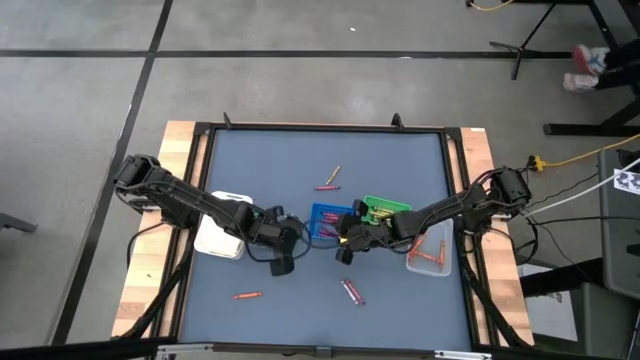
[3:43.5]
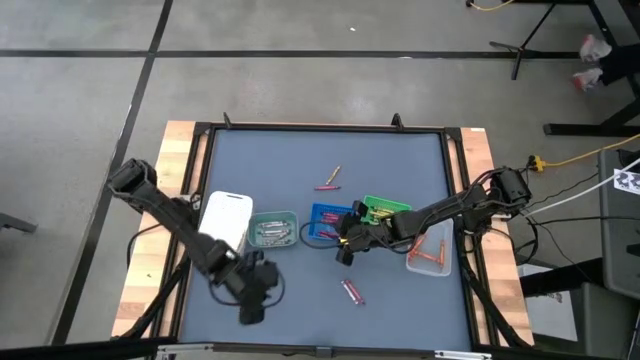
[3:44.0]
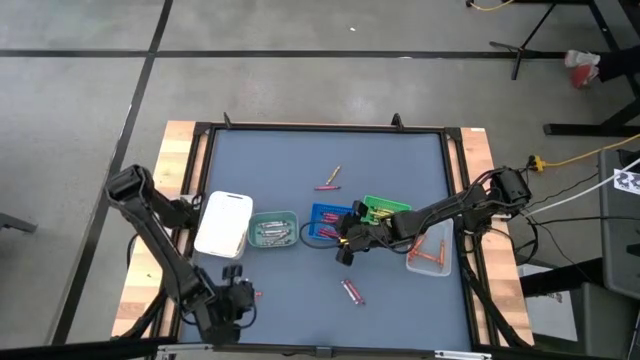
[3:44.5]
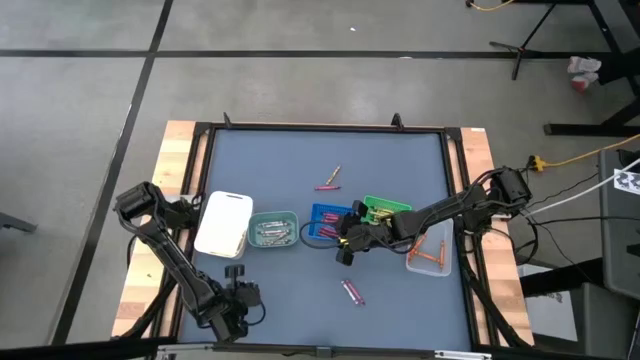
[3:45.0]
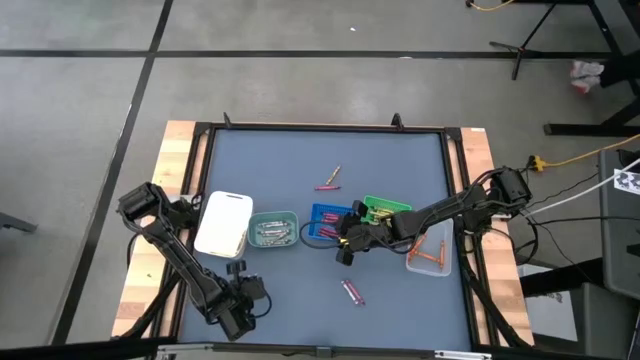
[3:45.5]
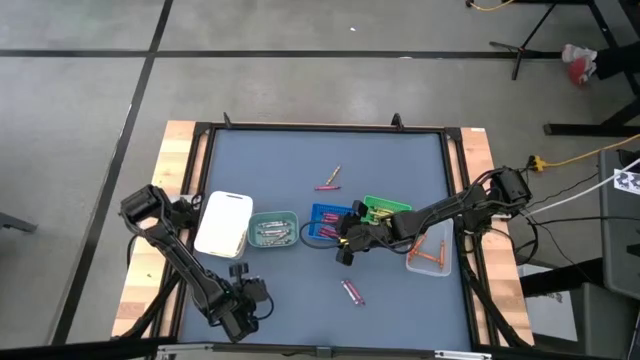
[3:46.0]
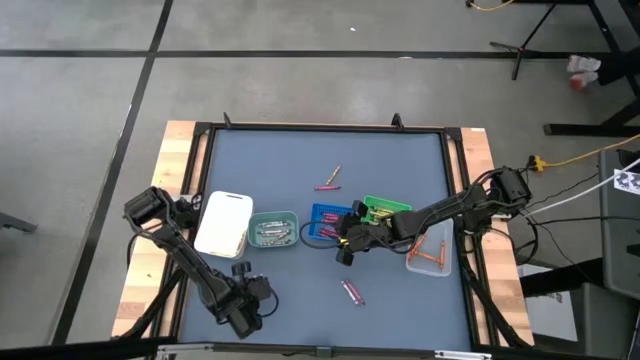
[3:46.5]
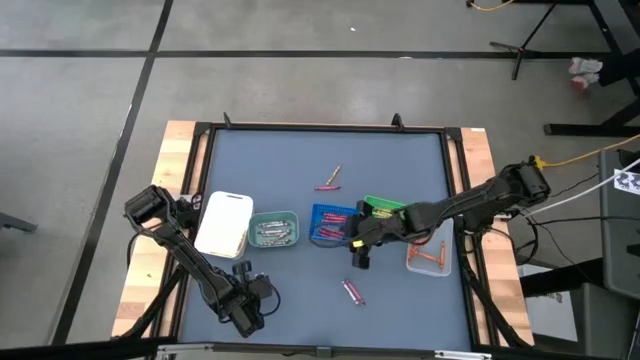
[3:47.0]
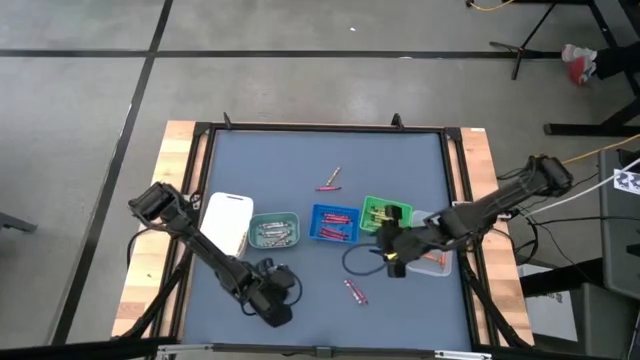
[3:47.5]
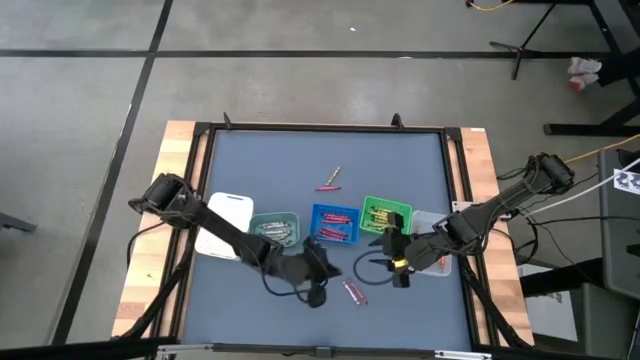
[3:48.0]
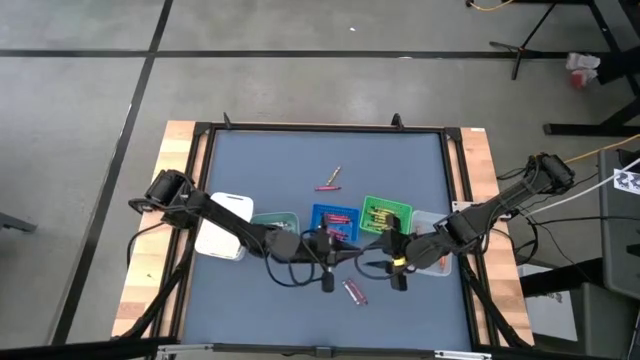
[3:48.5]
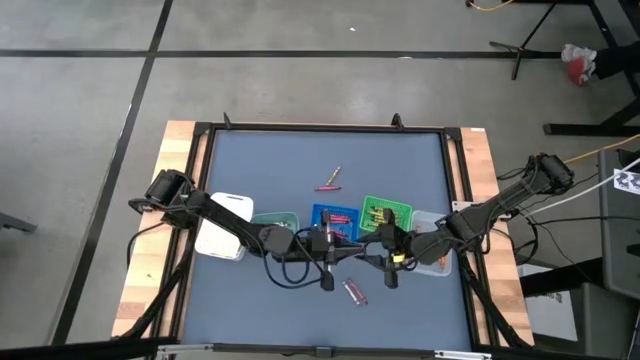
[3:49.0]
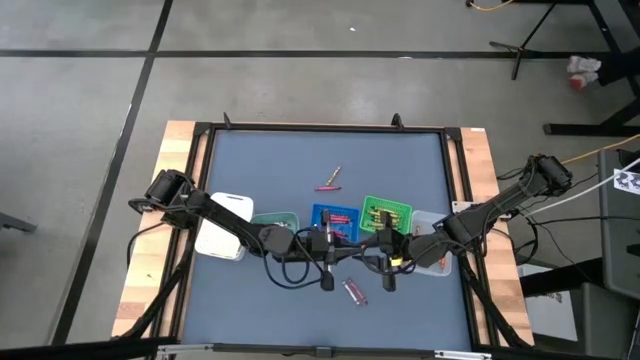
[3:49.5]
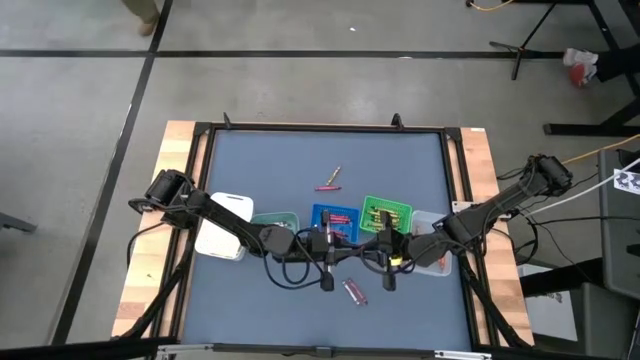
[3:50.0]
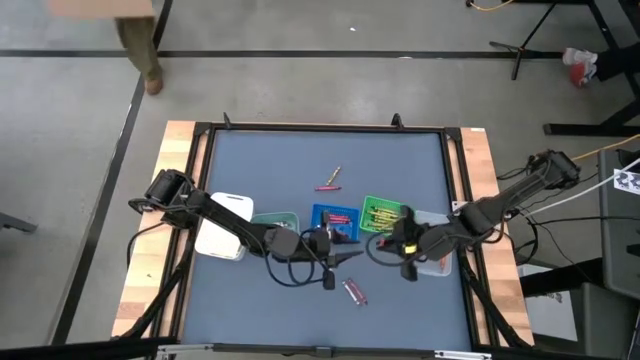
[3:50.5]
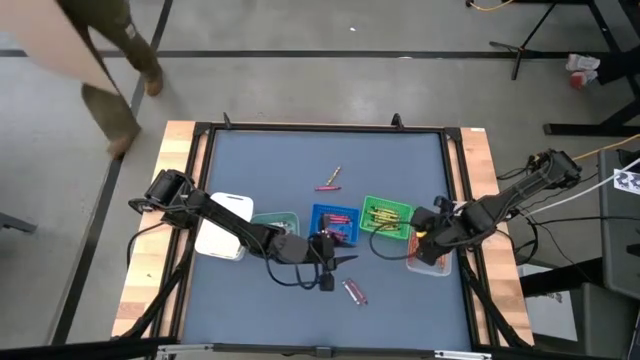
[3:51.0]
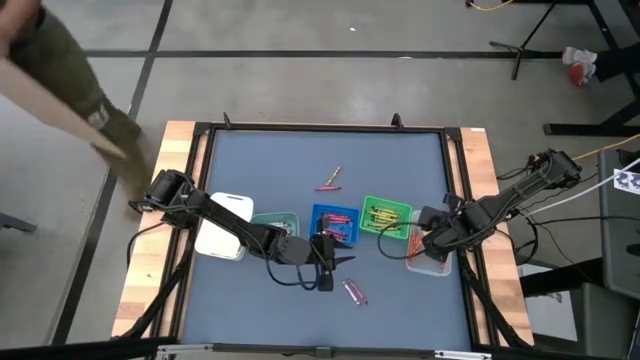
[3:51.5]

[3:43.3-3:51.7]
Task: Sort crayons
Put the orange crayon into the transparent bin

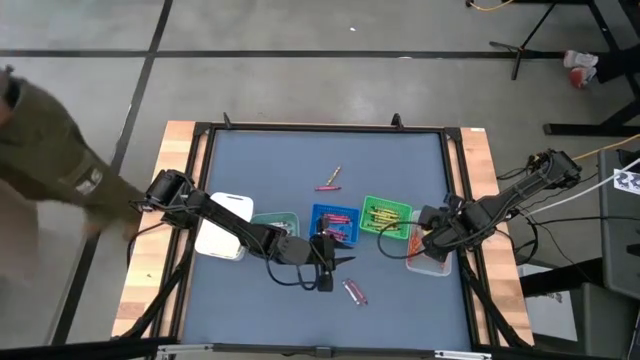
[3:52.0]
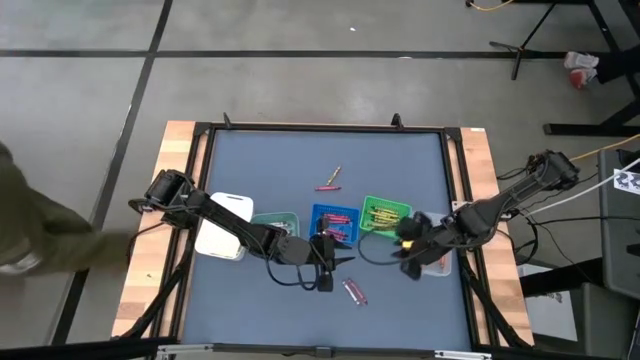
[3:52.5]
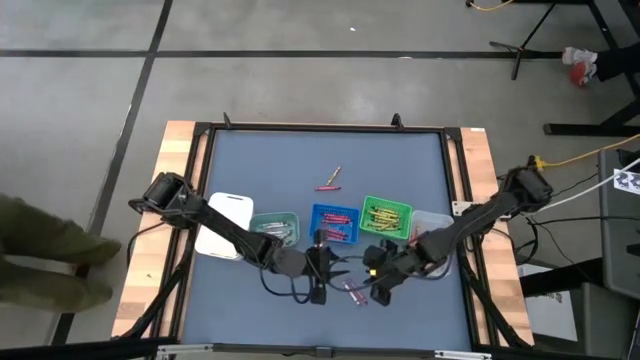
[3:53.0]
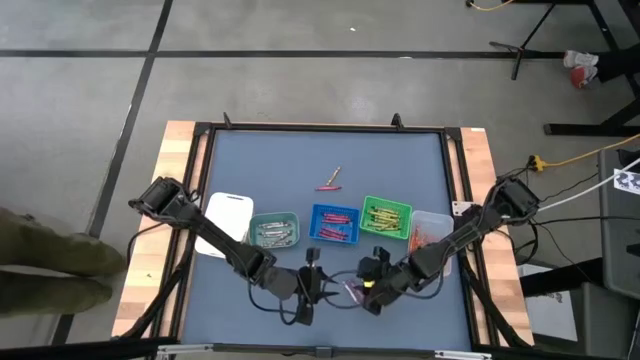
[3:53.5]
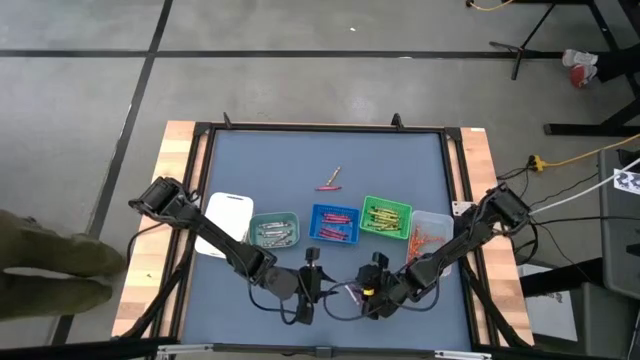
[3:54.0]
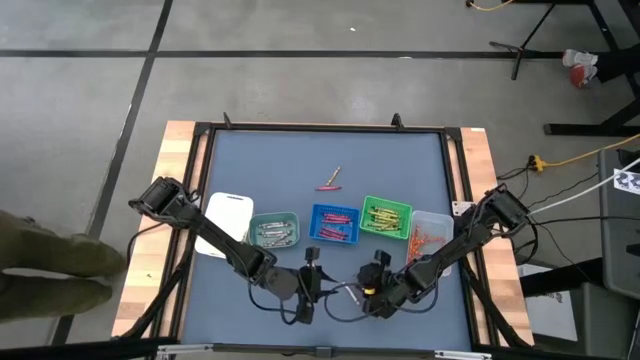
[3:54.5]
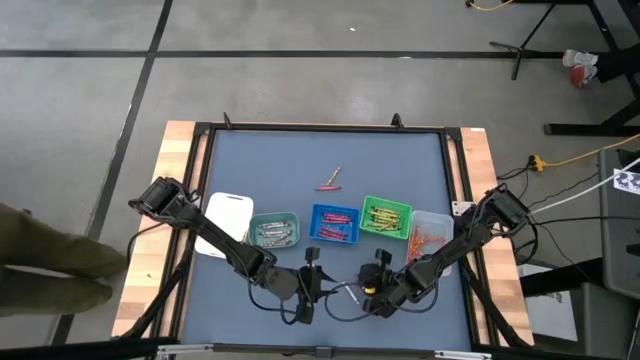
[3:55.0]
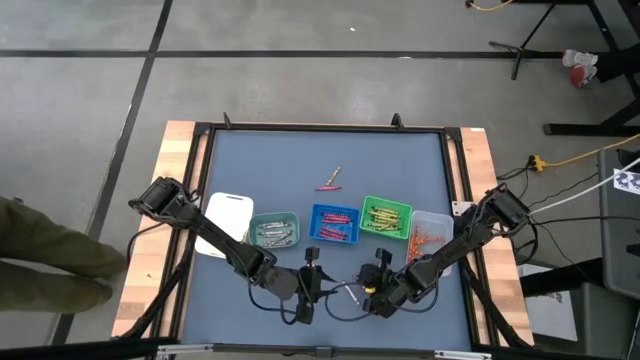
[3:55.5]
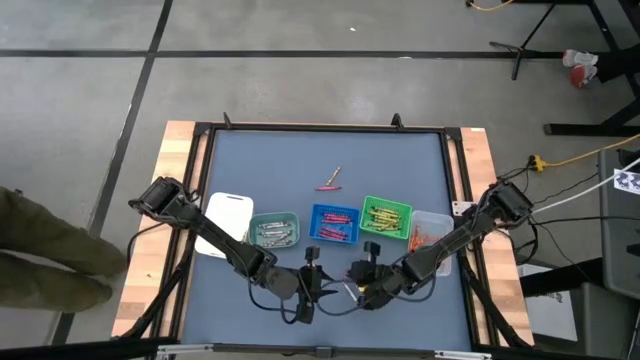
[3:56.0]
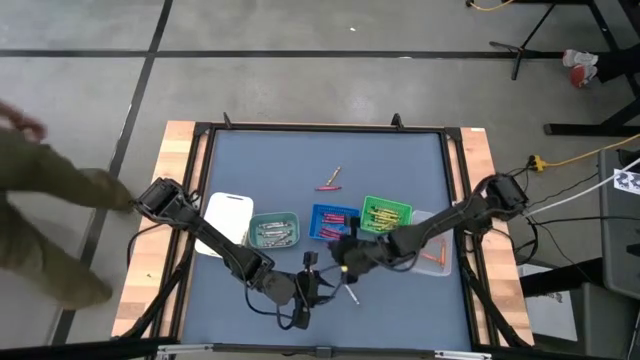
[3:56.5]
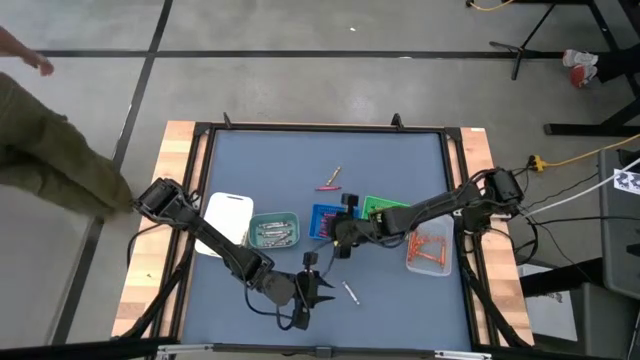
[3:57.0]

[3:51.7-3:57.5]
Put the red crayon into the blue bin

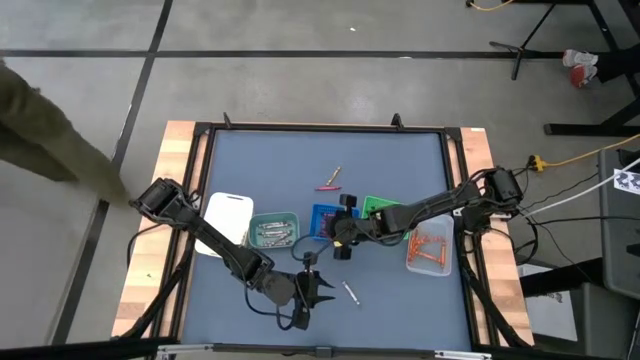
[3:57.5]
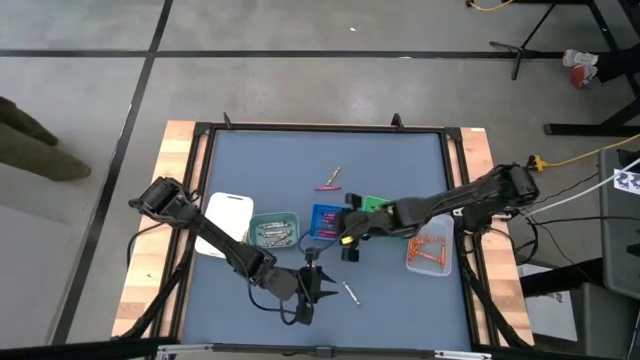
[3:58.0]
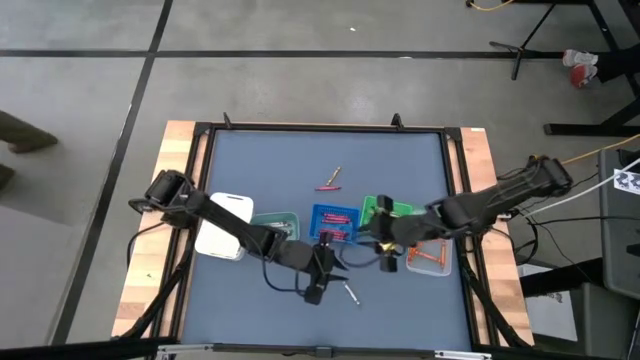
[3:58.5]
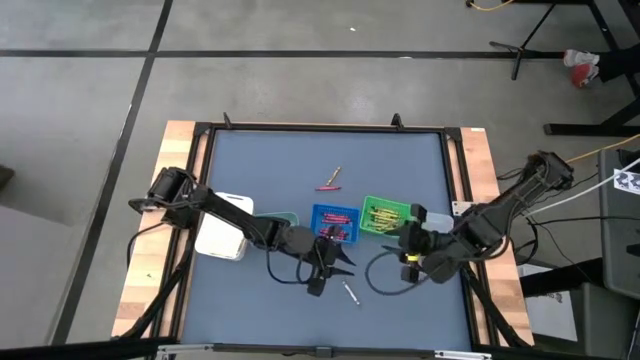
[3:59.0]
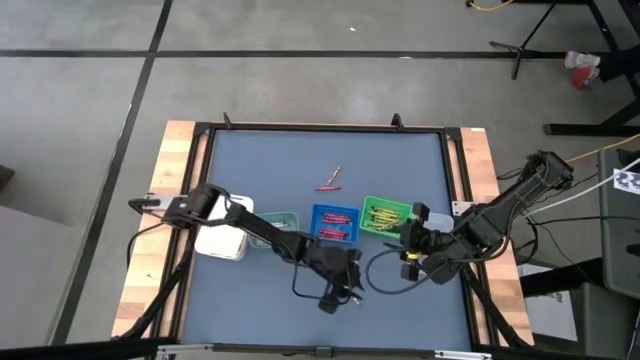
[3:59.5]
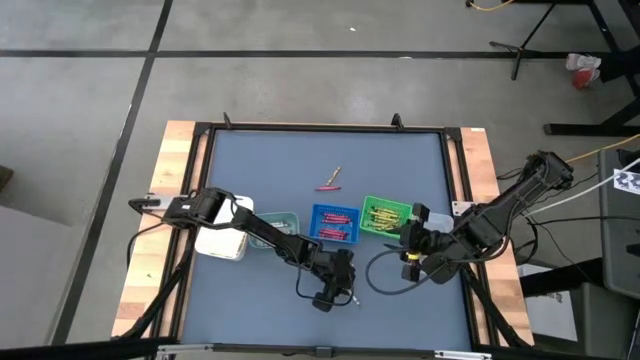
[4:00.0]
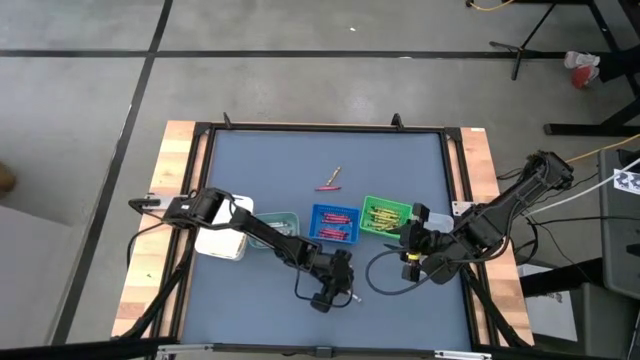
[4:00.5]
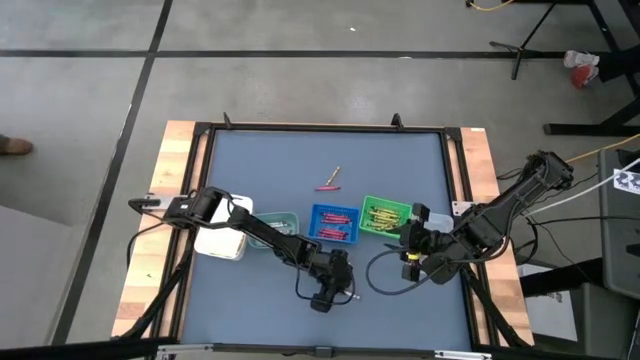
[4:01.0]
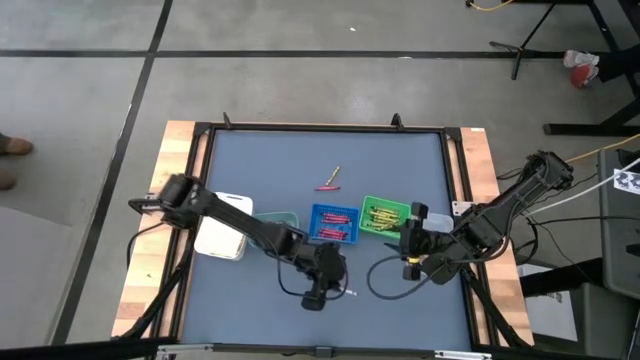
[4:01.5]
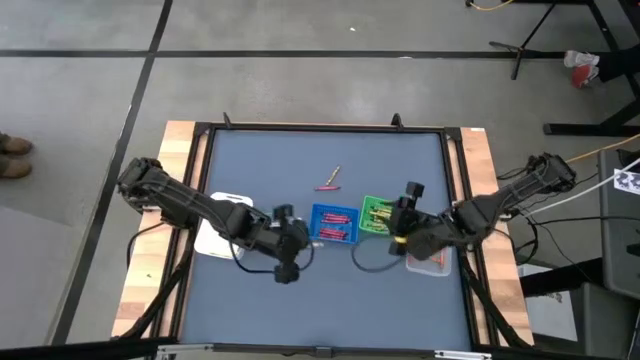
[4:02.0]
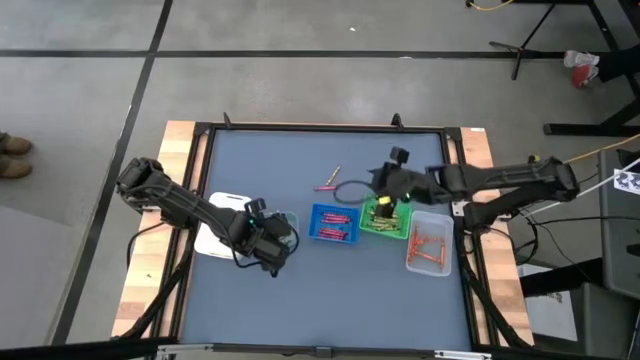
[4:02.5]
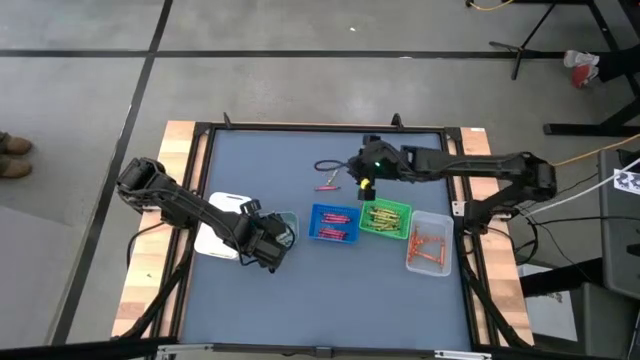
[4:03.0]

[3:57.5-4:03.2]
Put the gray crayon into the light green bin

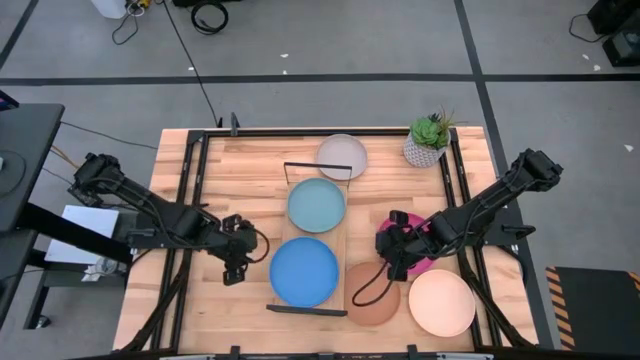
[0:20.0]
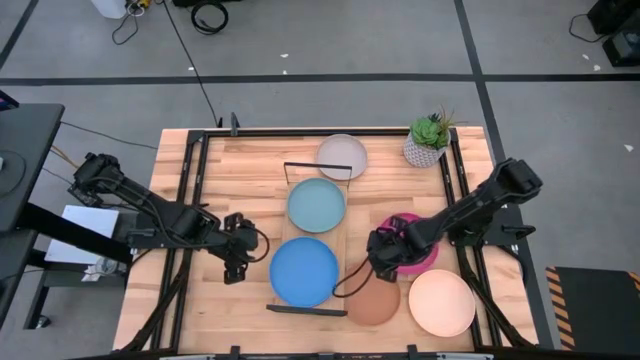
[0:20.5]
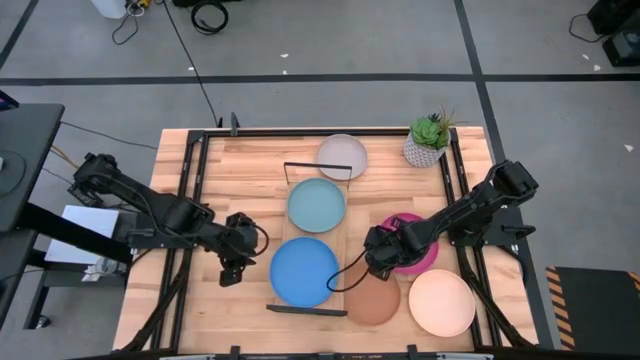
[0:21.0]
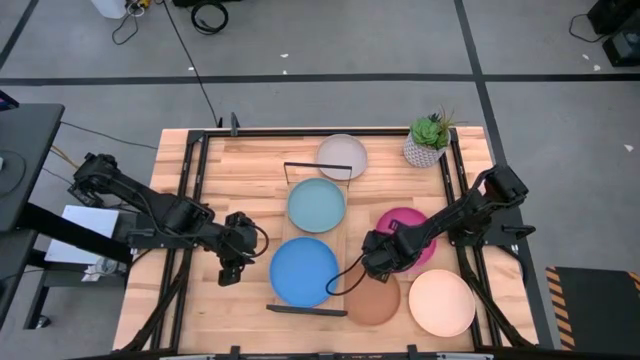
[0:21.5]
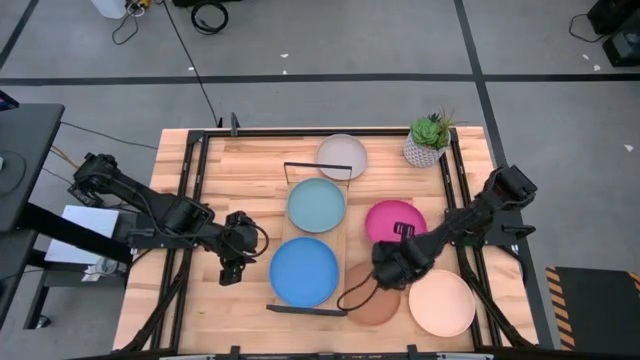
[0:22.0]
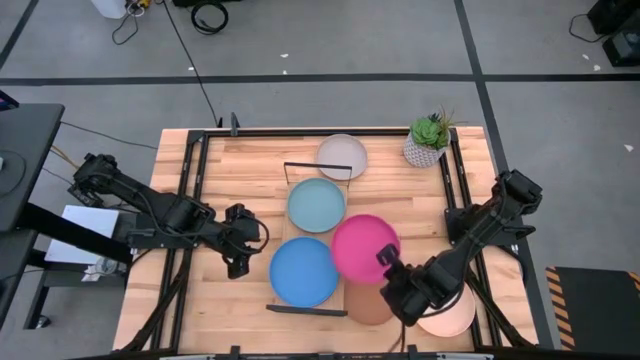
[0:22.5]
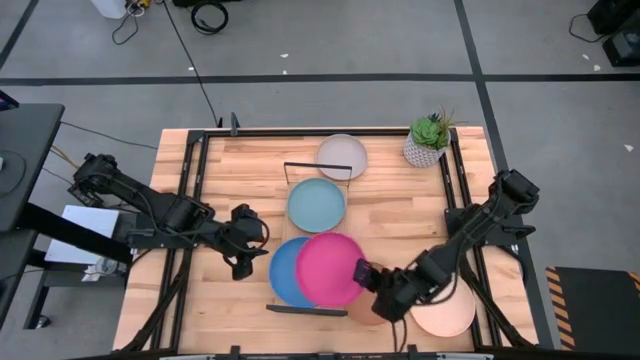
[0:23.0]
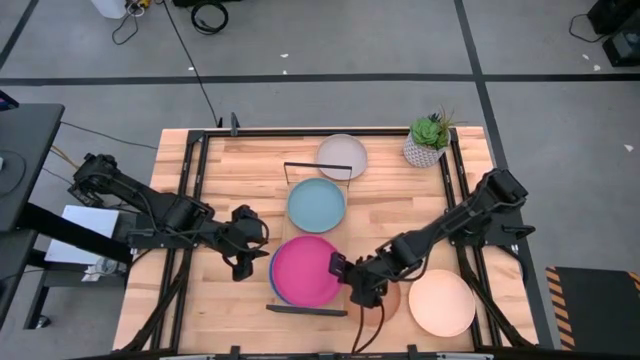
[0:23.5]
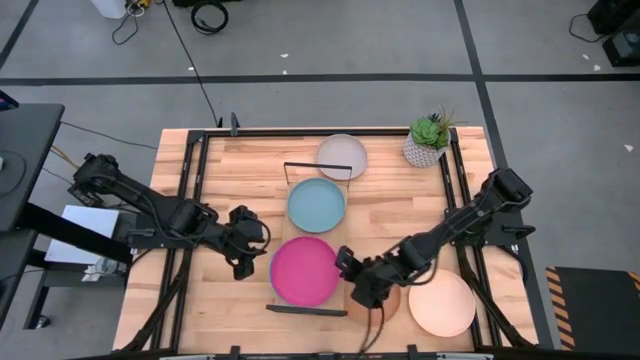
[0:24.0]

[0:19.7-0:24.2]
Task: Place and stack plates onto a shelf
Stack the pink plate on top of the blue plate on the shelf
